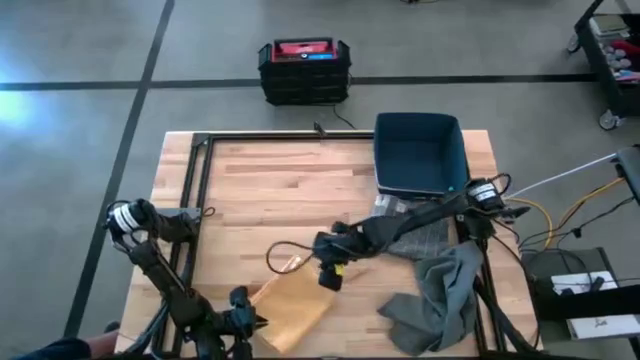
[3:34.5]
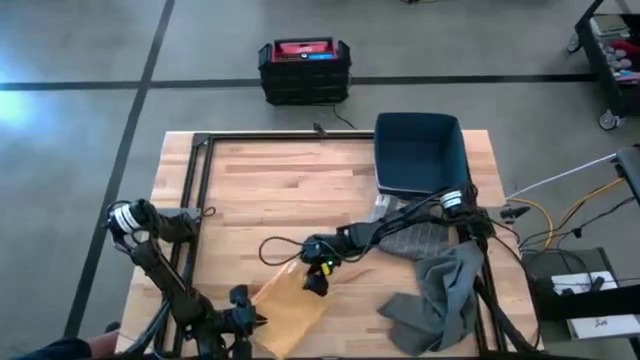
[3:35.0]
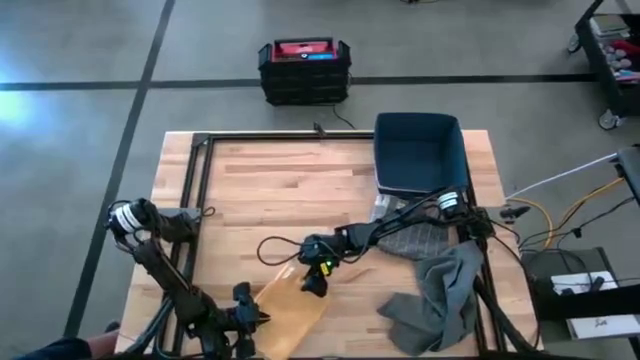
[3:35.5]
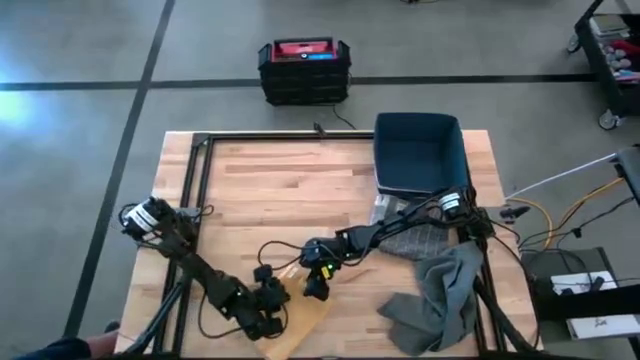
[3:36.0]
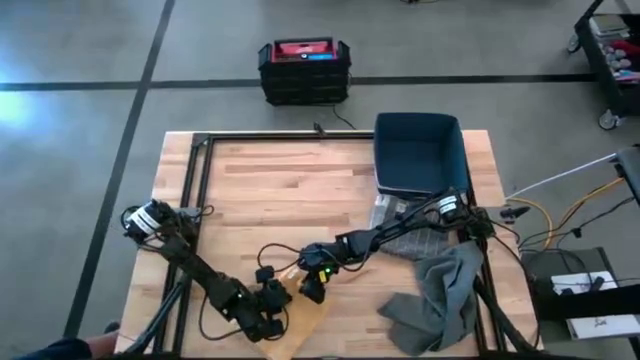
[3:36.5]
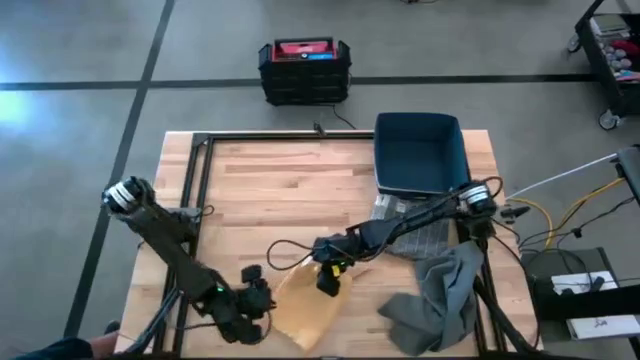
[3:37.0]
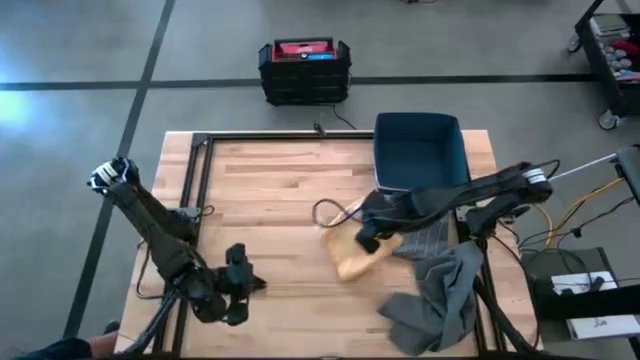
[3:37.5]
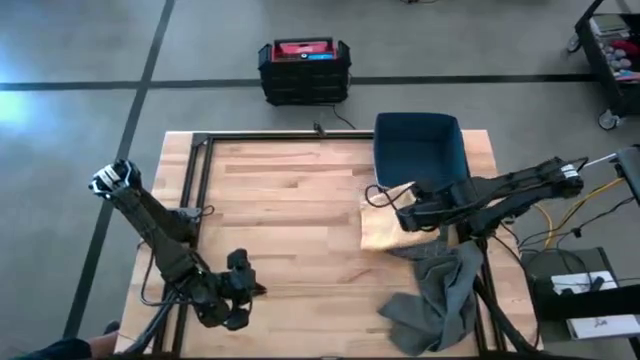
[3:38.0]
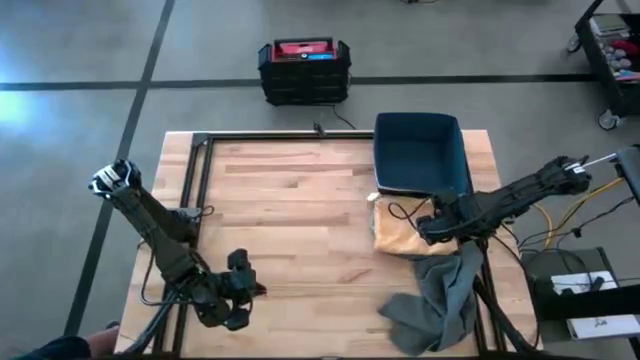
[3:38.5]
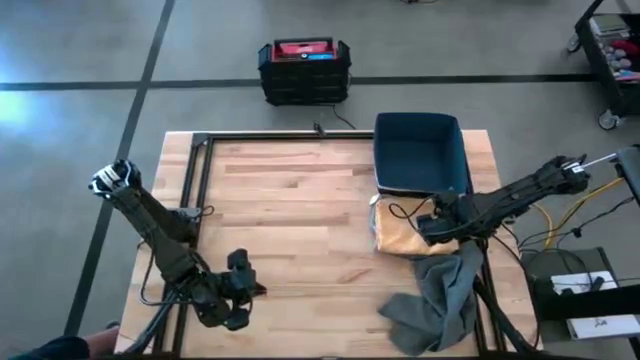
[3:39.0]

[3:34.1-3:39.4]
Task: Fold towel
Stack the yellow kitchen towel on top of the gray patterned kitchen towel

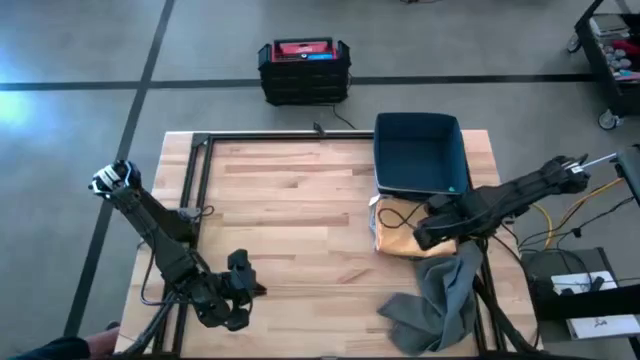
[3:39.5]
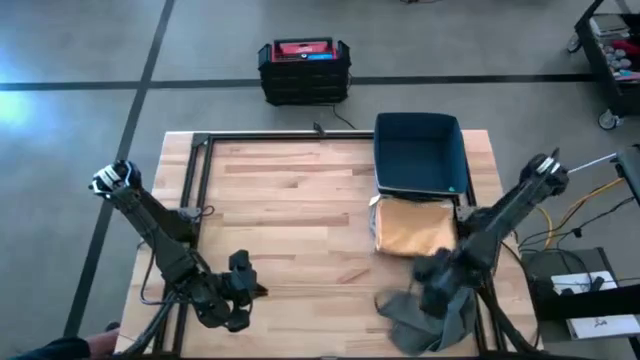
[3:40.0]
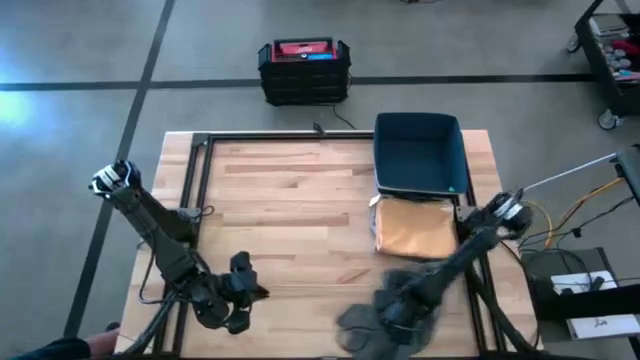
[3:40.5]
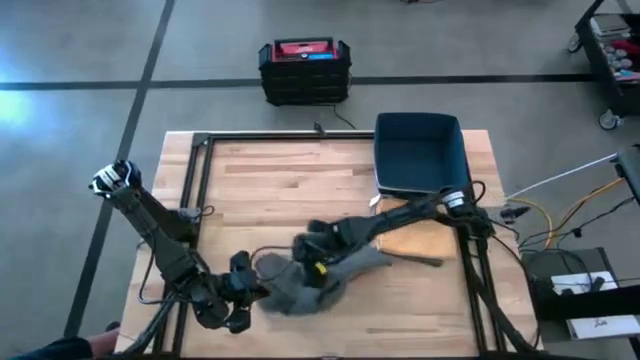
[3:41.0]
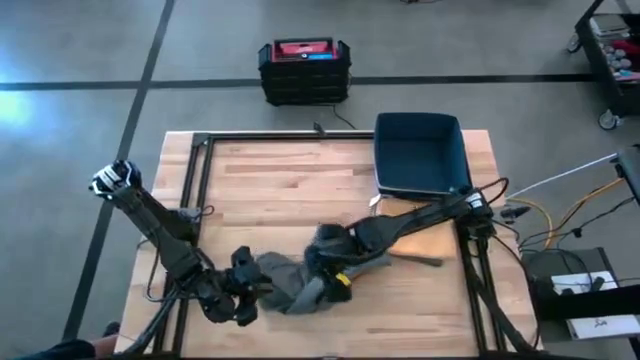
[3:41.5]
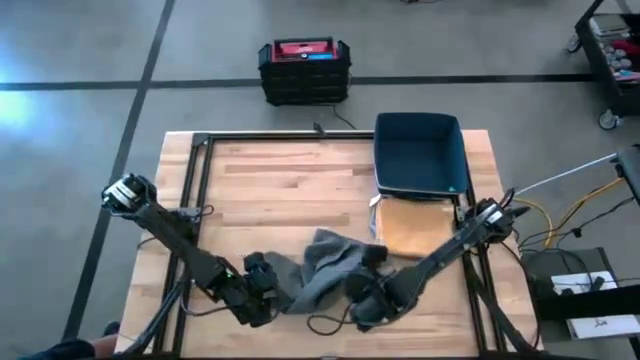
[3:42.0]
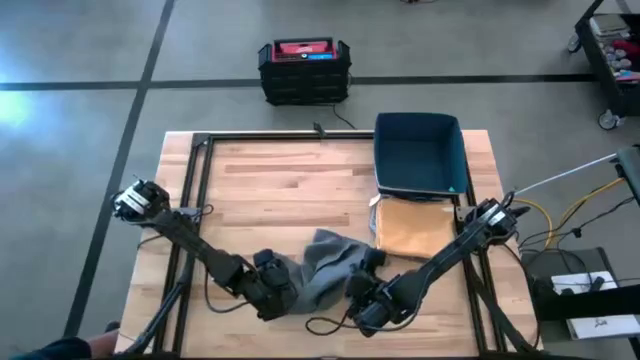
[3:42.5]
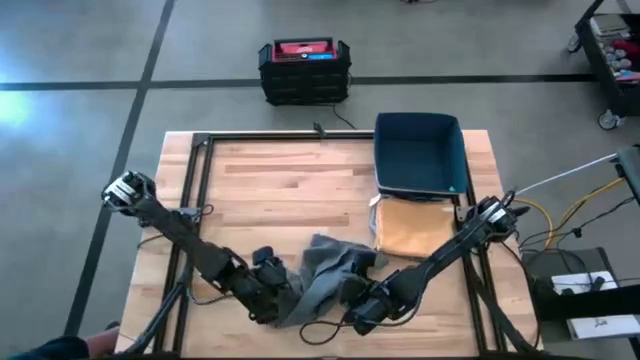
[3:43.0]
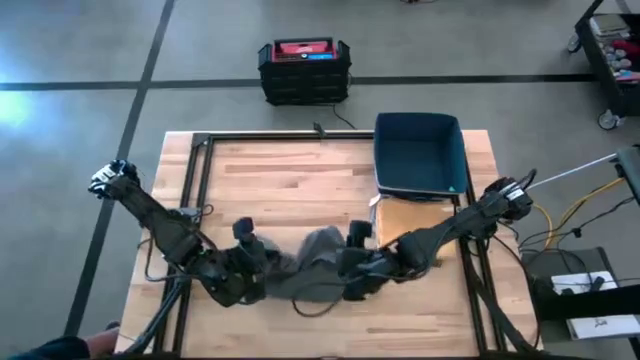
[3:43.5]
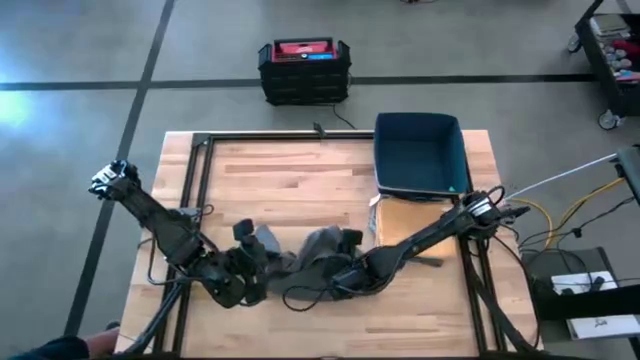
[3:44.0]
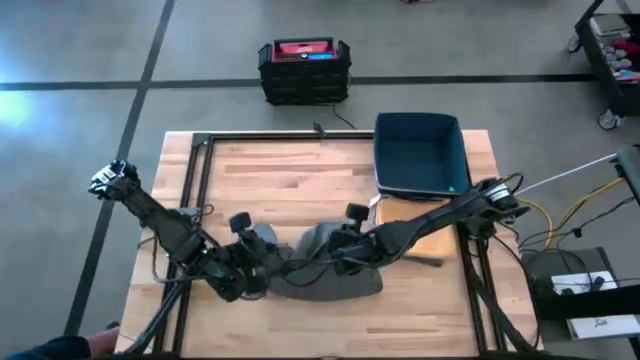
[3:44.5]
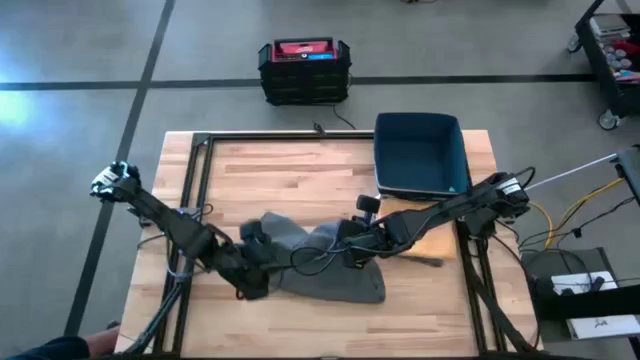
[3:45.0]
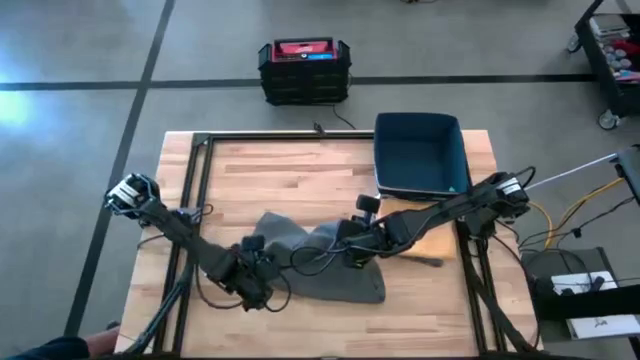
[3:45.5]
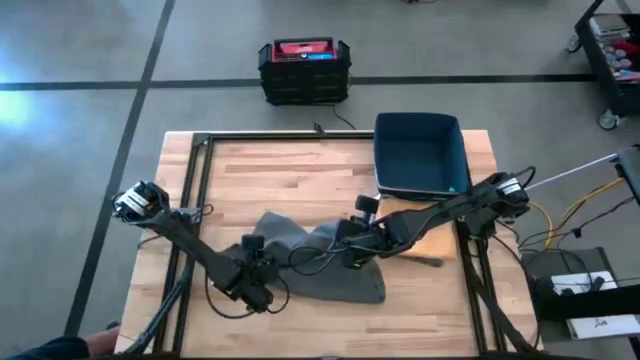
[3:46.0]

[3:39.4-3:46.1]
Fold the gray kitchen towel

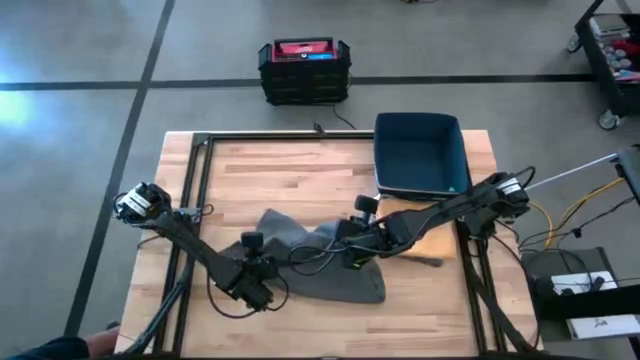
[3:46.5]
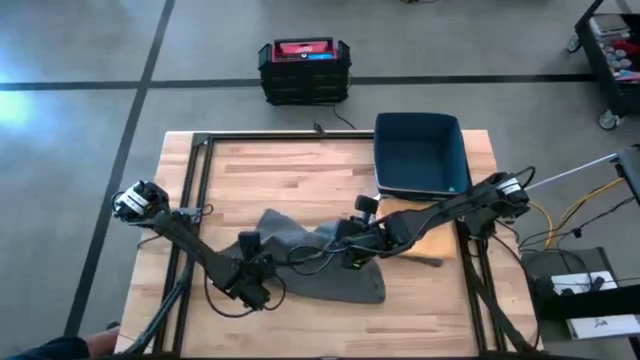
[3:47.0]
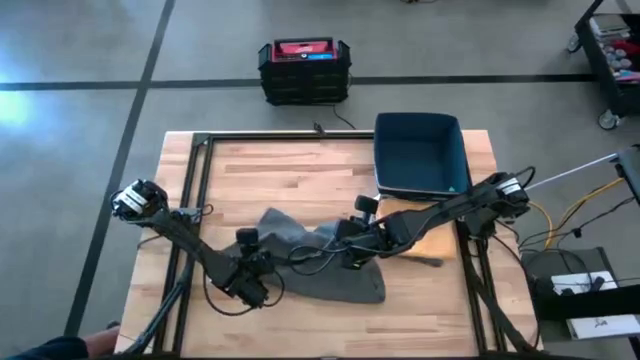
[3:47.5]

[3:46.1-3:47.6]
Fold the gray kitchen towel

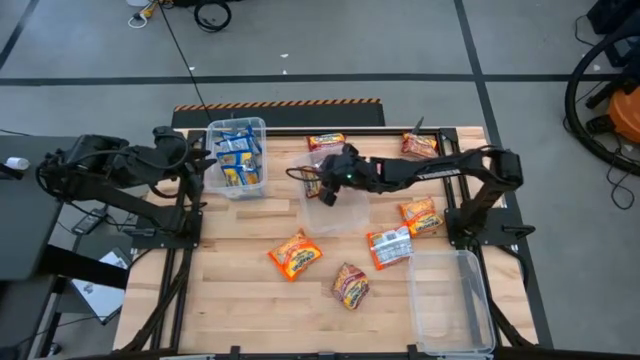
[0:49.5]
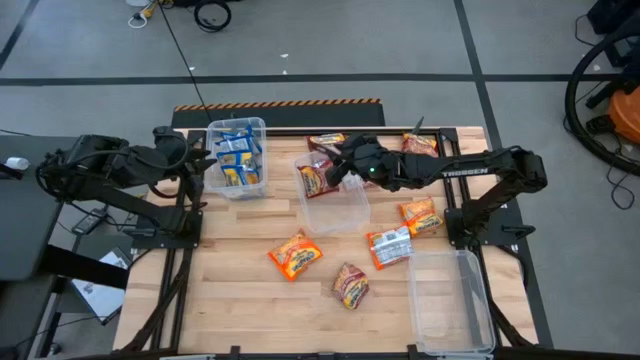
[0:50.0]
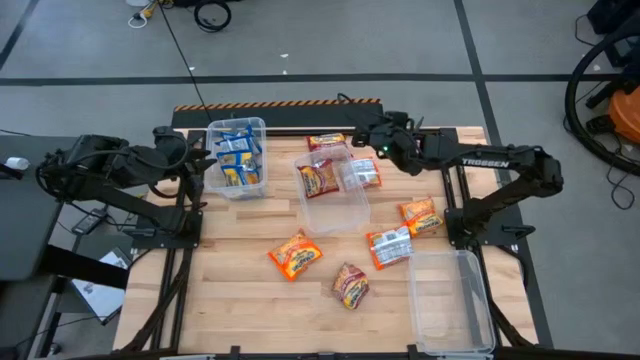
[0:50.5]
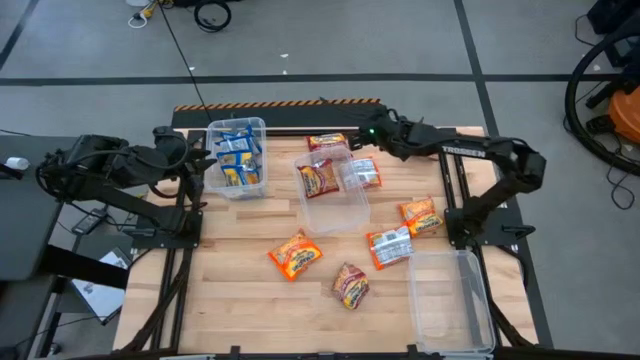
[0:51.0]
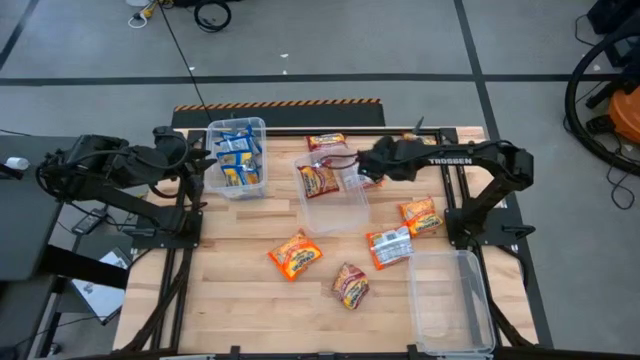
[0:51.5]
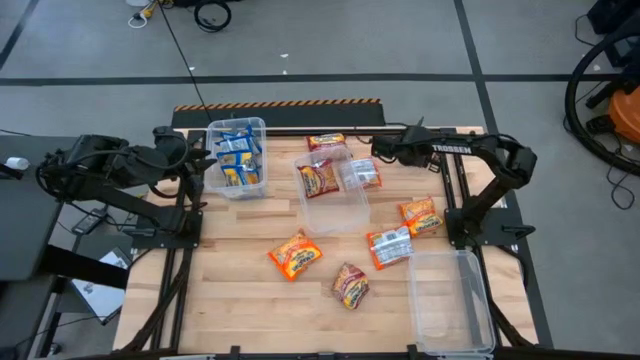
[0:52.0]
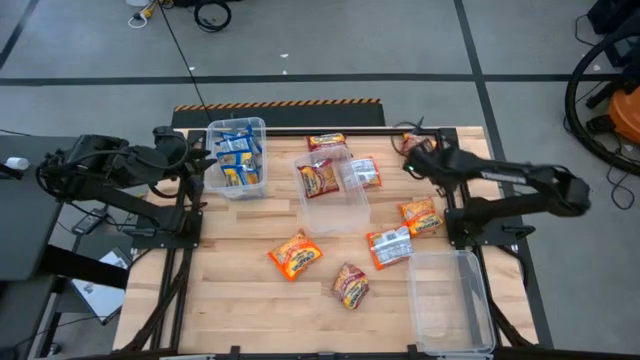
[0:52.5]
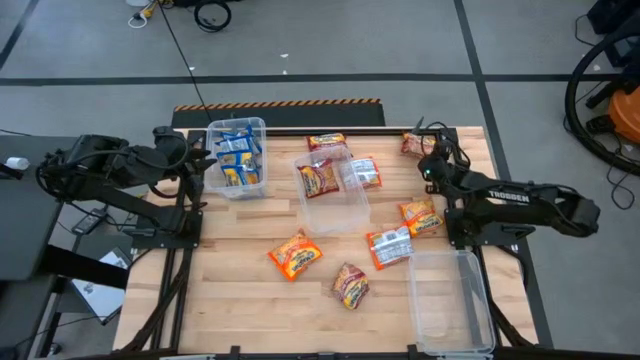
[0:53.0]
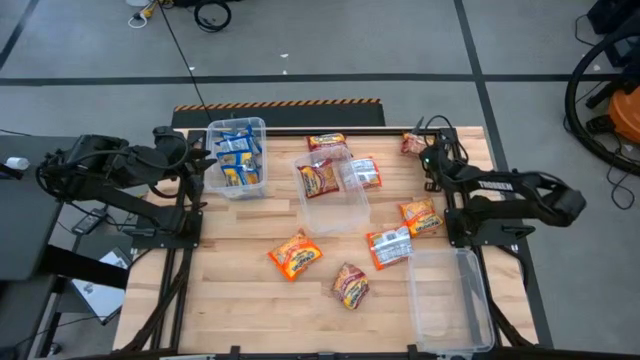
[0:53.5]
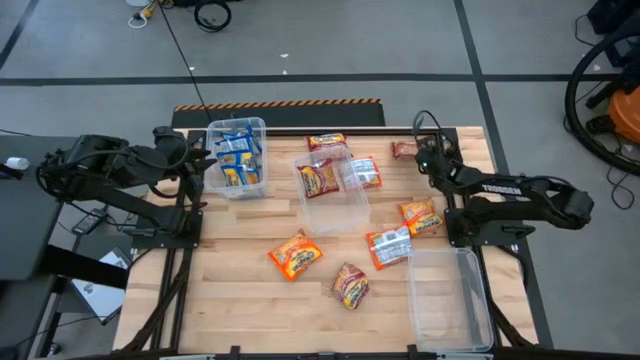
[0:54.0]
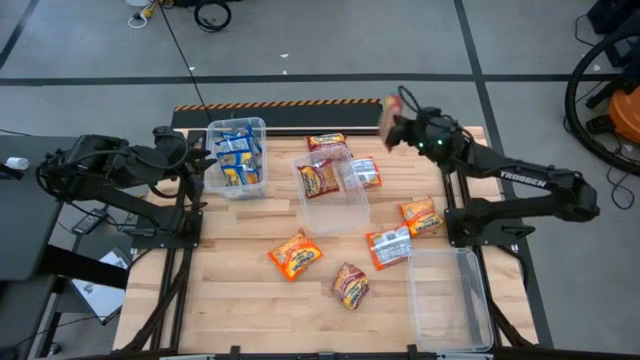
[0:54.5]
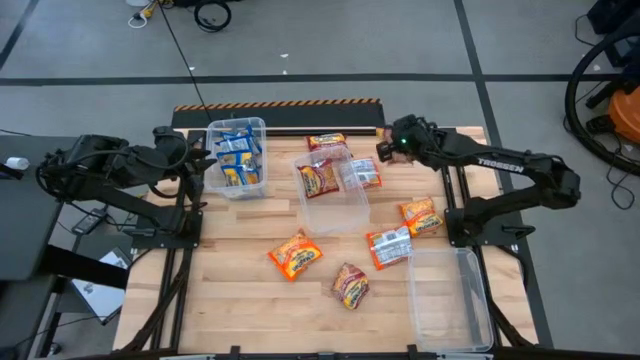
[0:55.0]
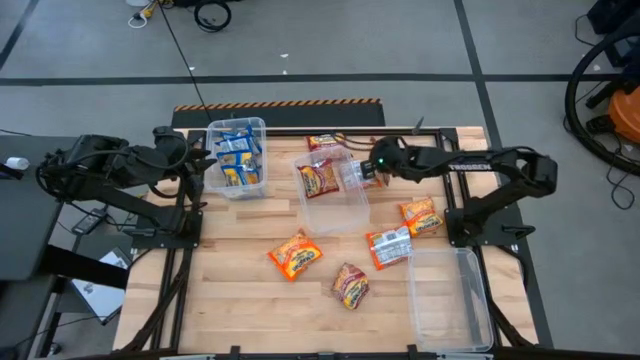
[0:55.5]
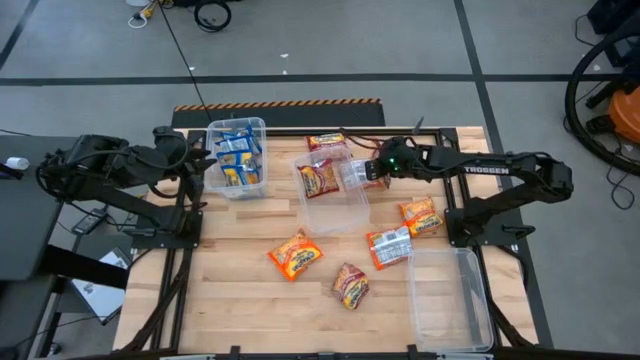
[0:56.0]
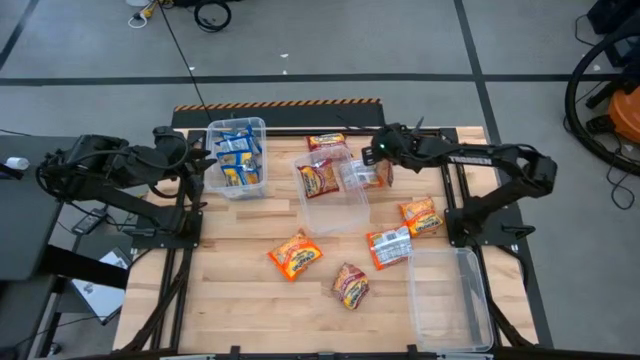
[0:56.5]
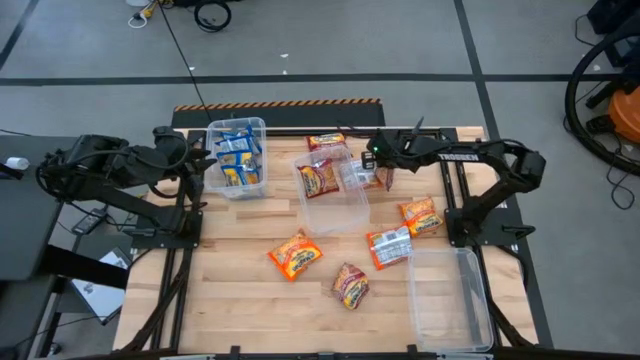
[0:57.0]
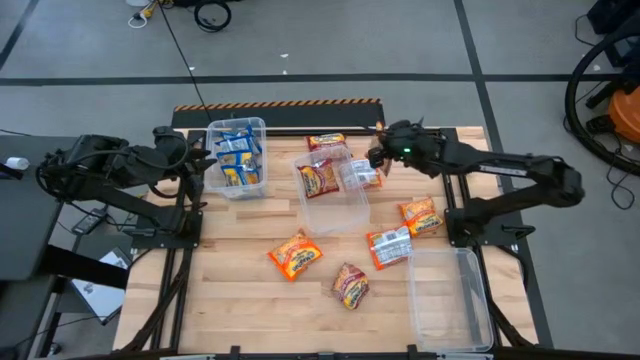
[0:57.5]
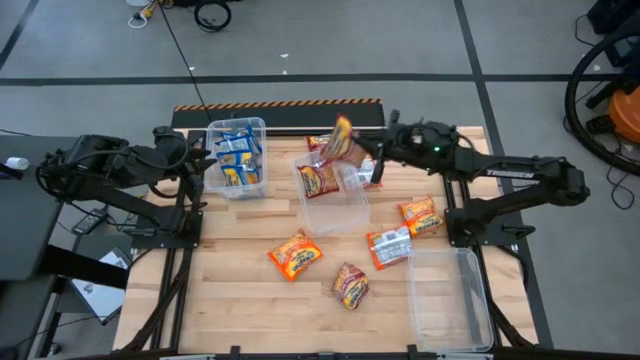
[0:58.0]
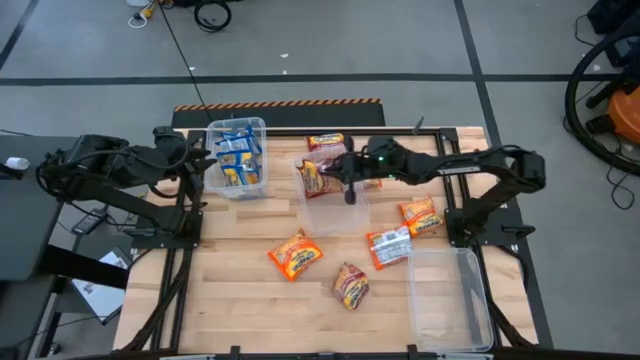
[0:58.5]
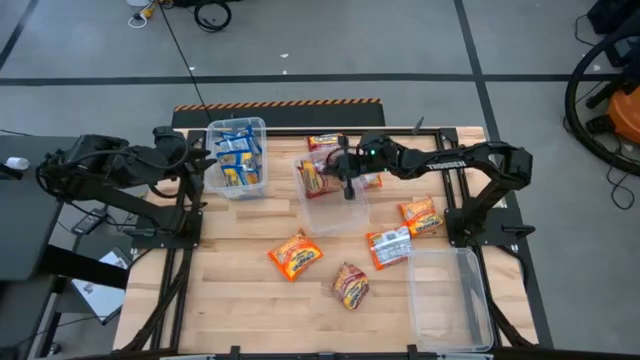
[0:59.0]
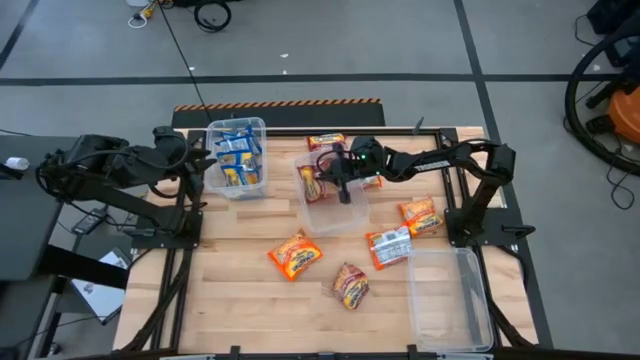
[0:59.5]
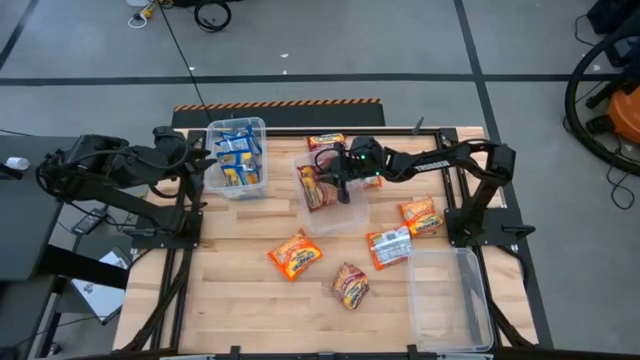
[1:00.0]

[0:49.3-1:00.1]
Task: Sort Maruchan noodles
Put the red noodle pack into the middle transparent bin
